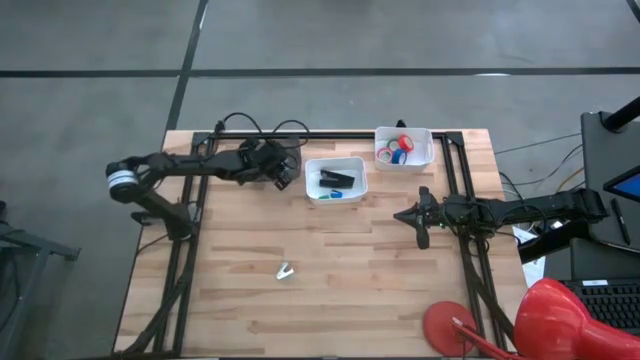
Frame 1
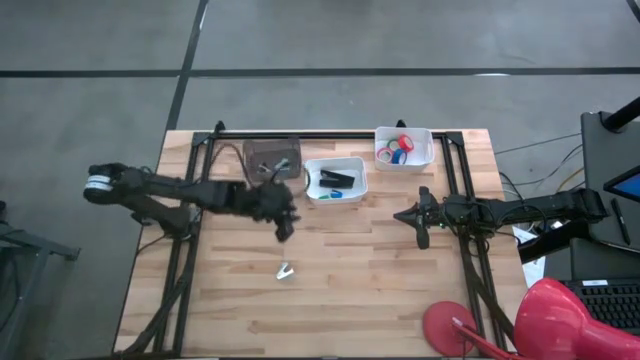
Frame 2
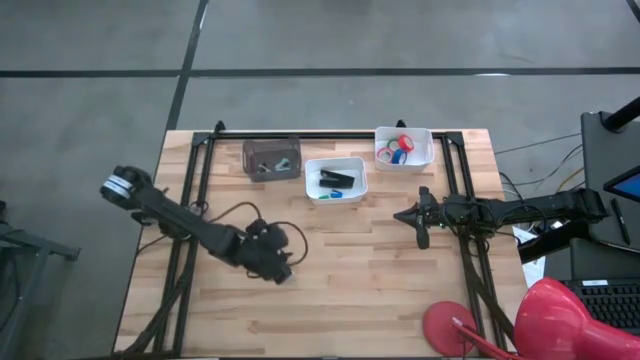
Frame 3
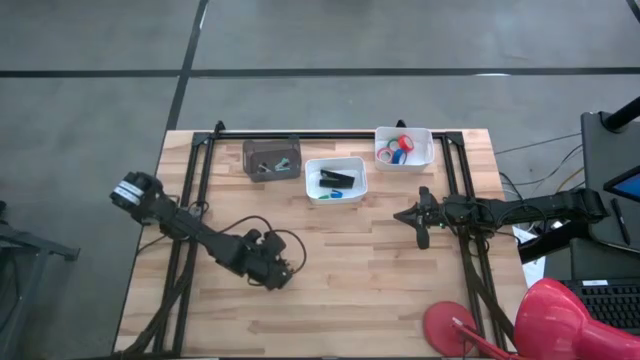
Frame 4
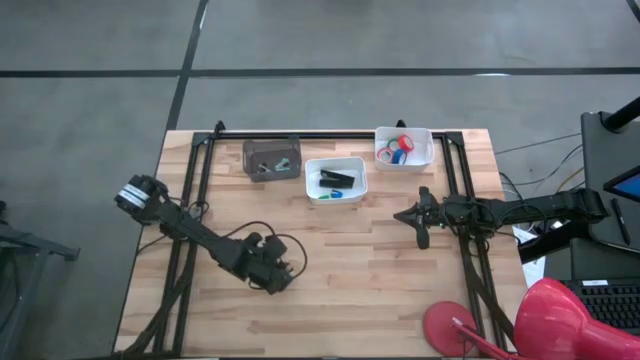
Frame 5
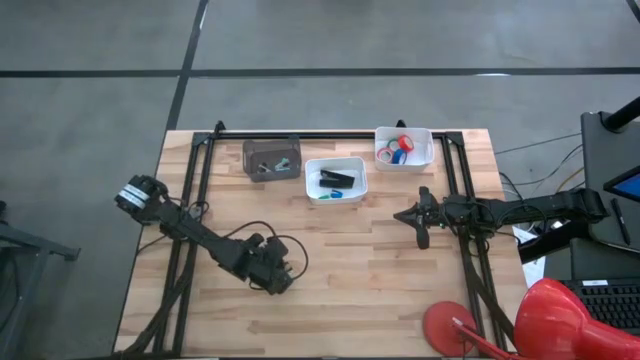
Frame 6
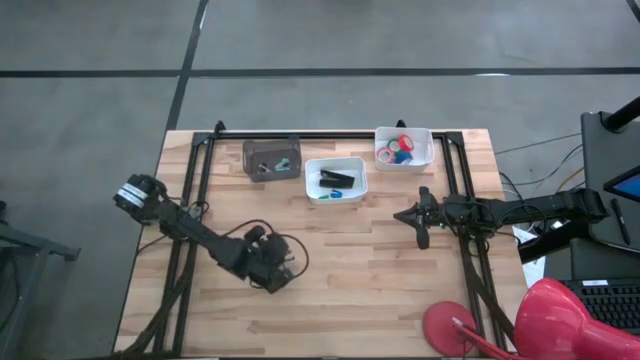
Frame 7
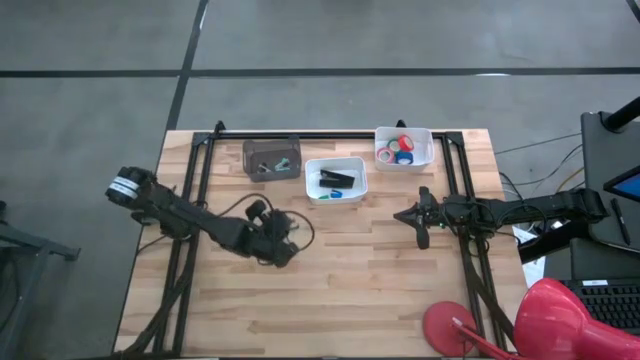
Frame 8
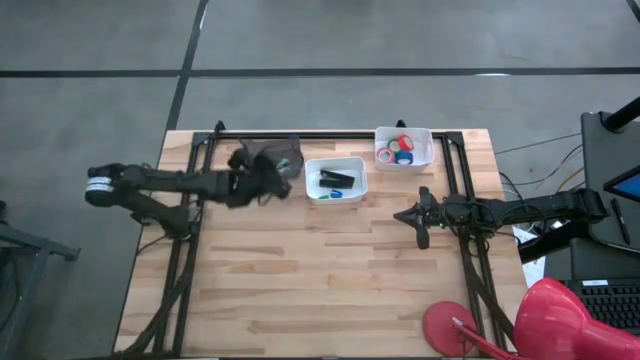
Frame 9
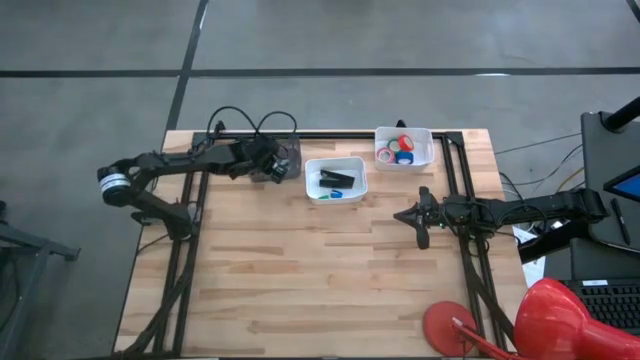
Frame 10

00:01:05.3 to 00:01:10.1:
Task: Pick and place Stapler, Stapler remover, tape
Put the light blue staple remover into the black bin

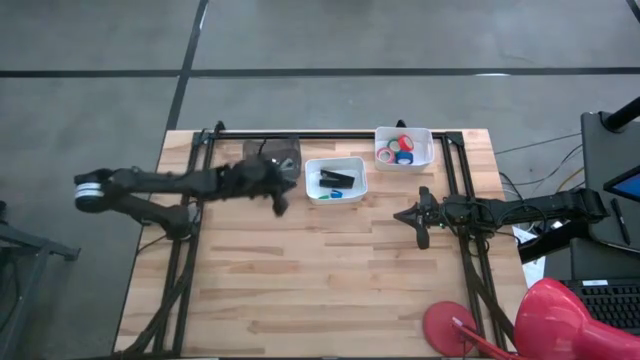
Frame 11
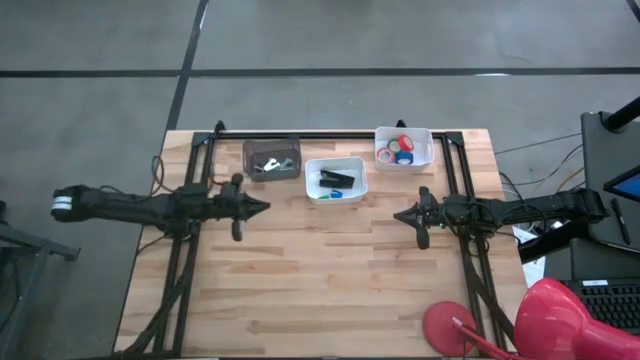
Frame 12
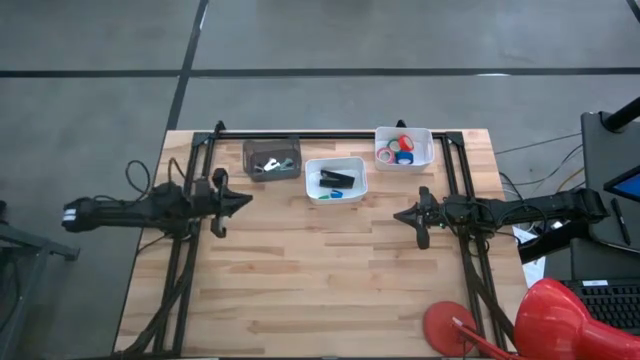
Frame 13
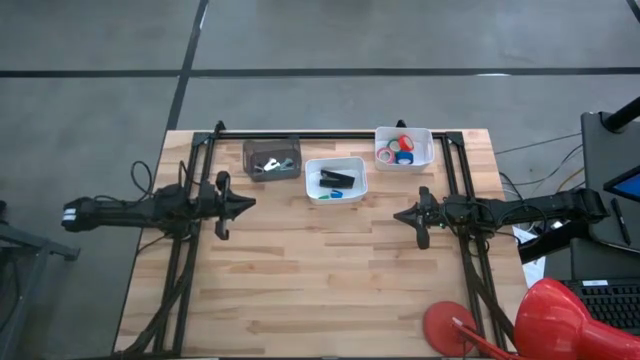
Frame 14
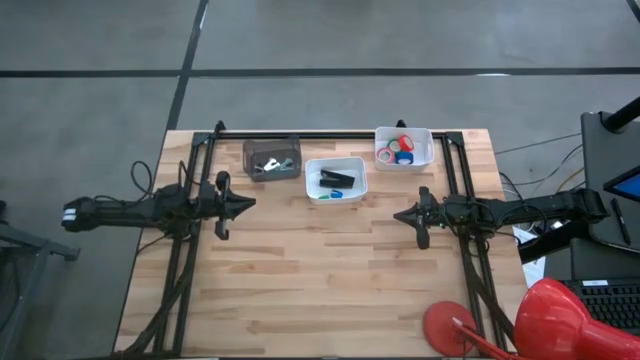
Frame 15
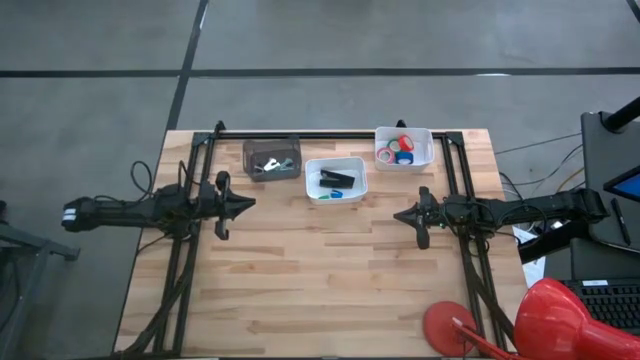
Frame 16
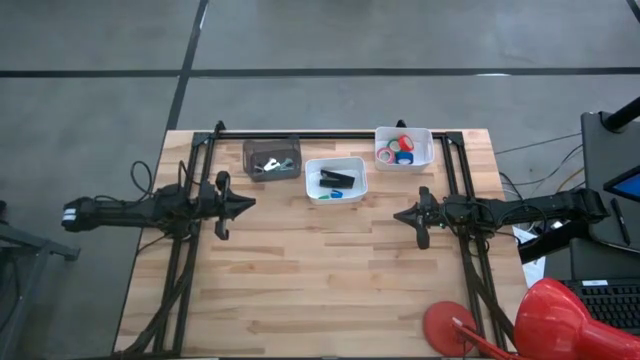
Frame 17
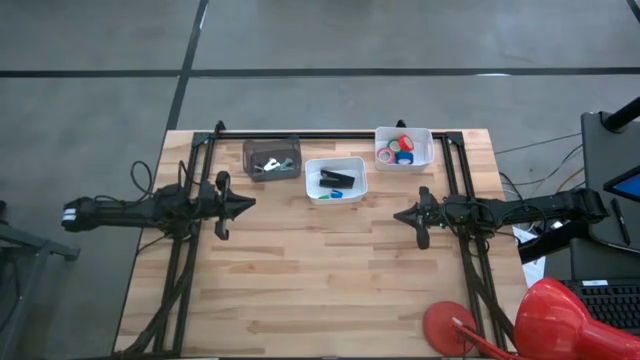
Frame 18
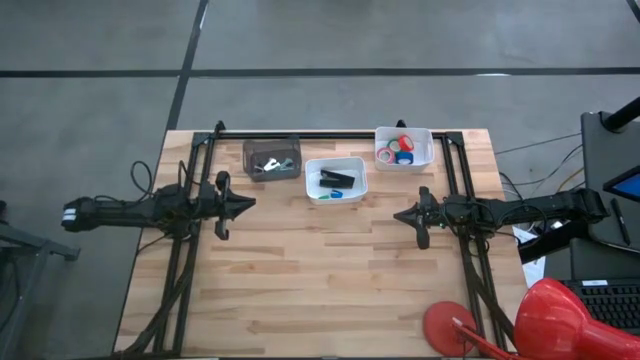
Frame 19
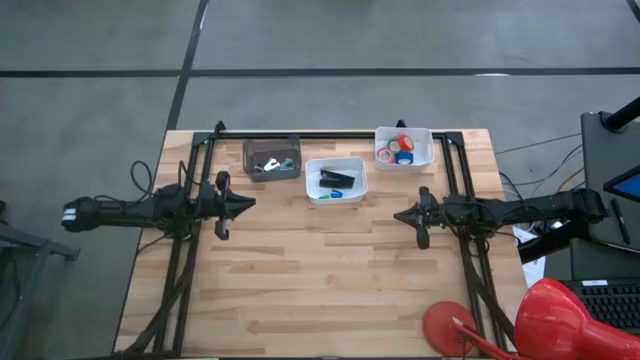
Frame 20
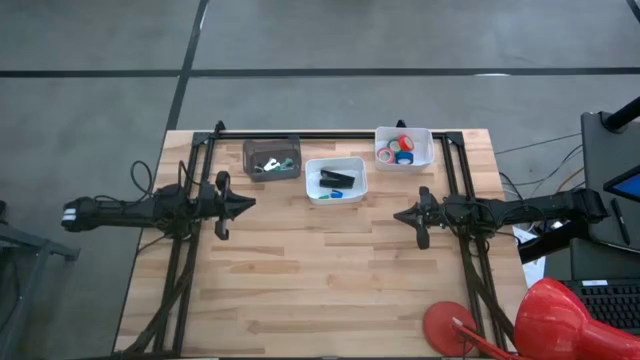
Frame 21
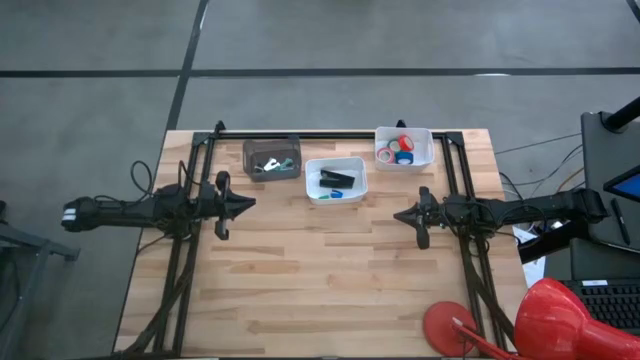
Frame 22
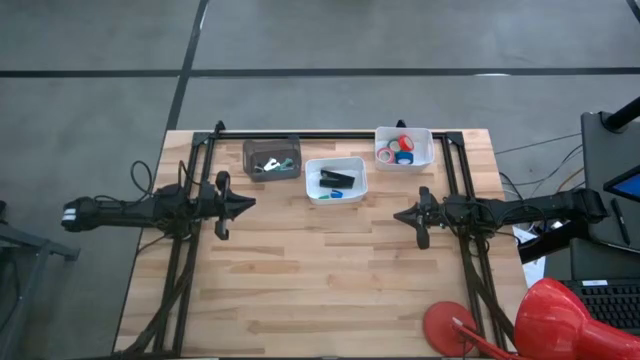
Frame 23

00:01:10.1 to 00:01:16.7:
Return to Home Position

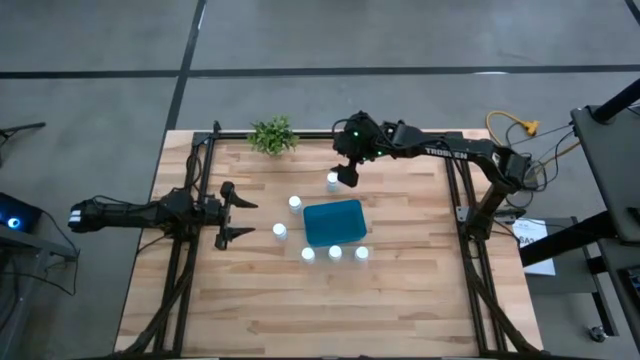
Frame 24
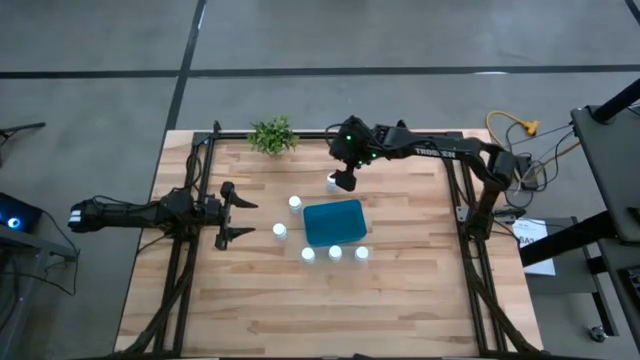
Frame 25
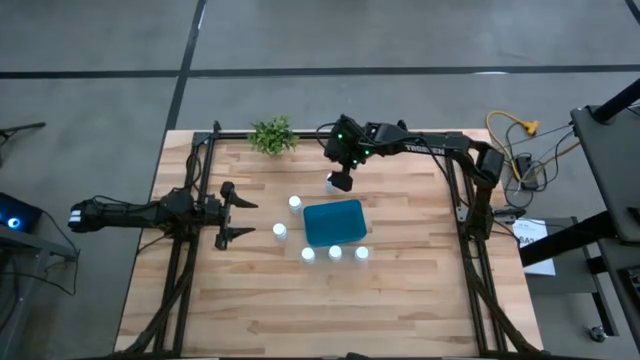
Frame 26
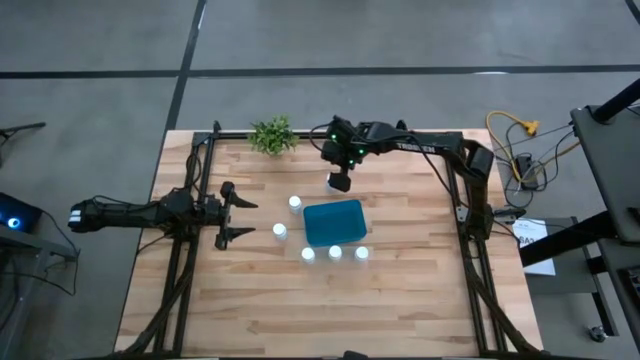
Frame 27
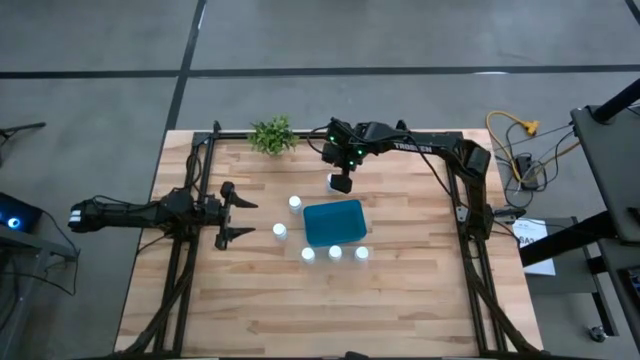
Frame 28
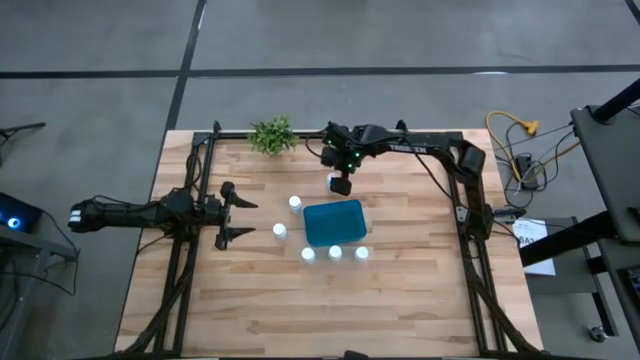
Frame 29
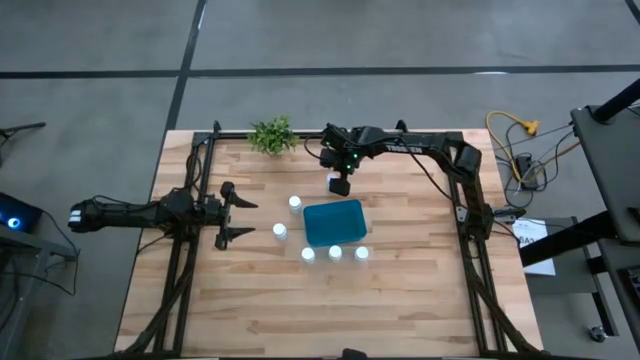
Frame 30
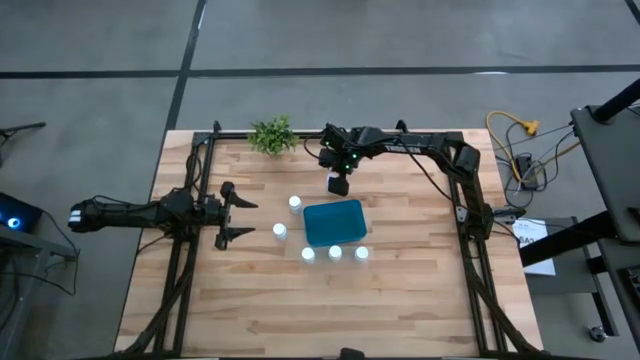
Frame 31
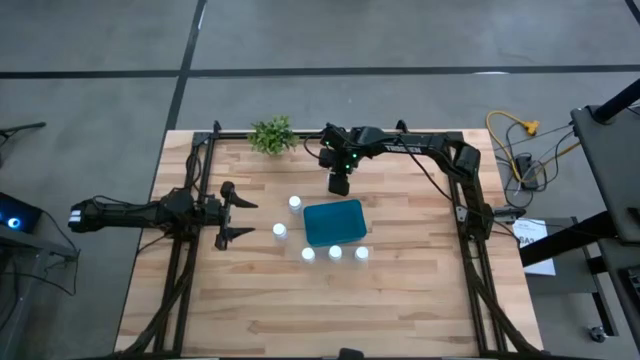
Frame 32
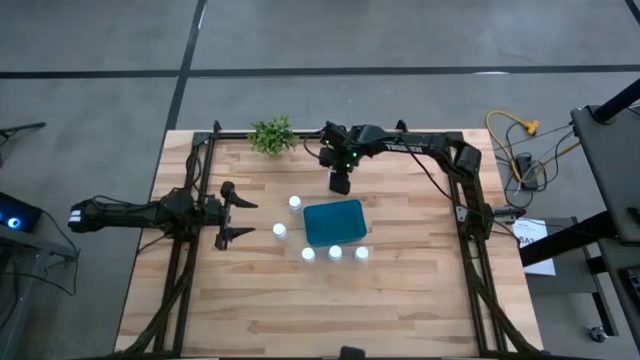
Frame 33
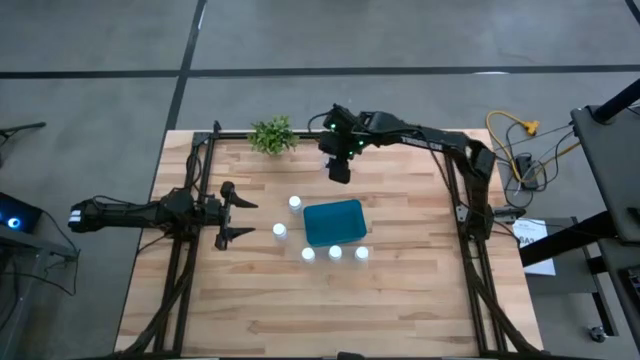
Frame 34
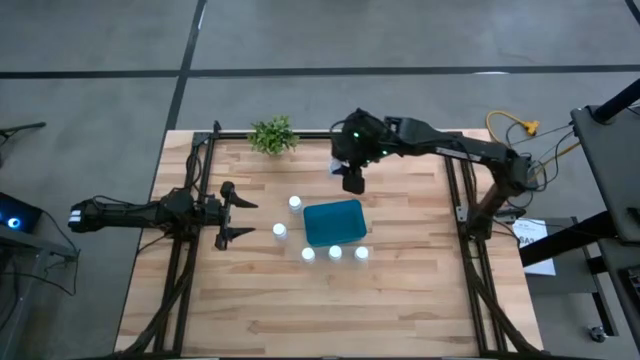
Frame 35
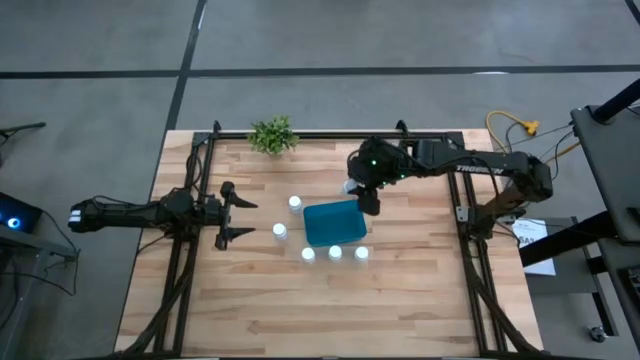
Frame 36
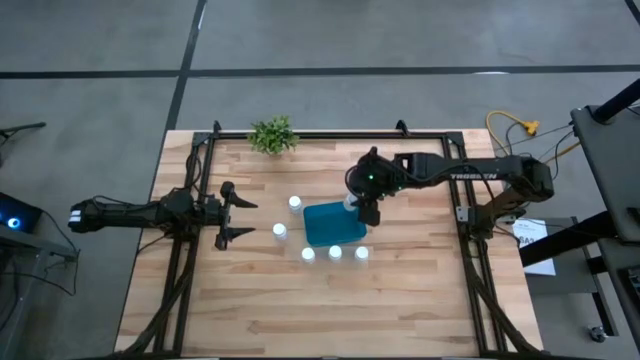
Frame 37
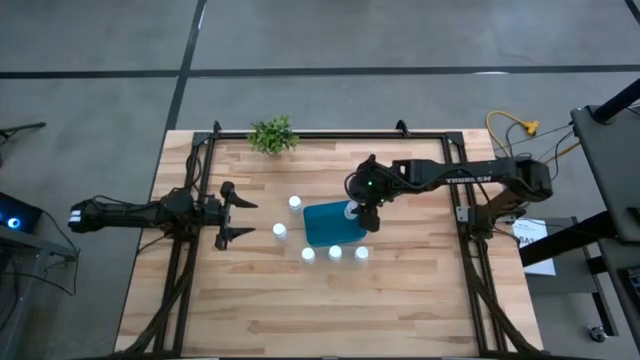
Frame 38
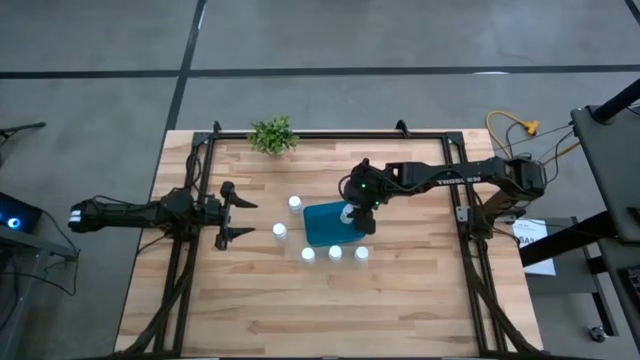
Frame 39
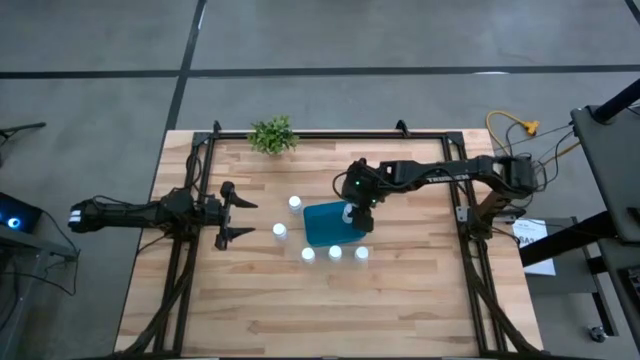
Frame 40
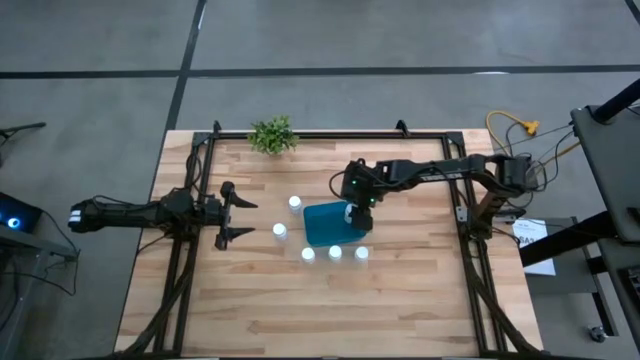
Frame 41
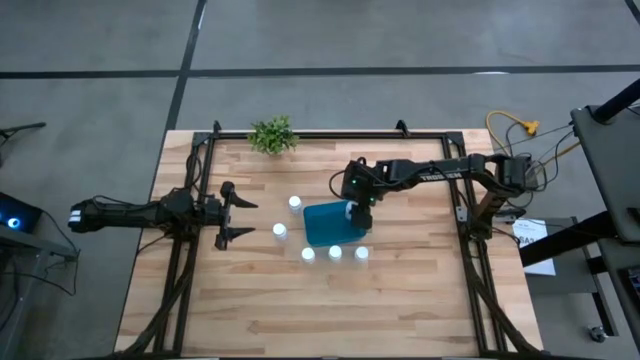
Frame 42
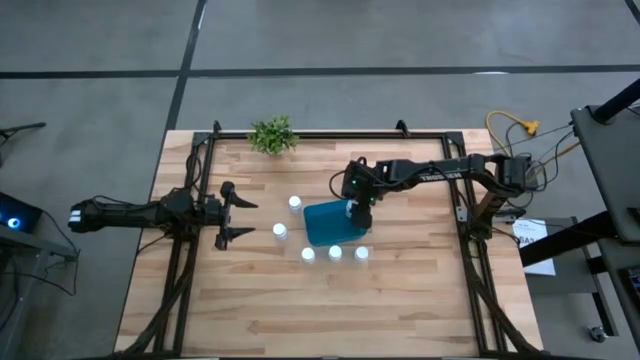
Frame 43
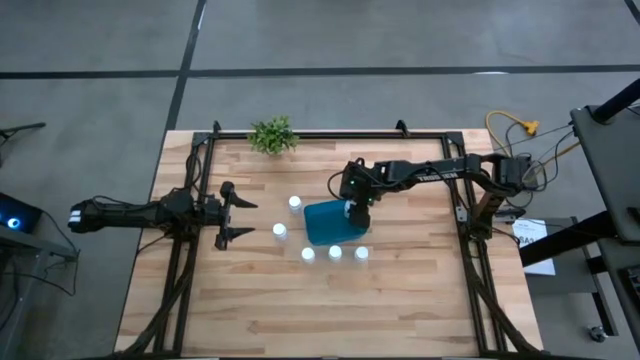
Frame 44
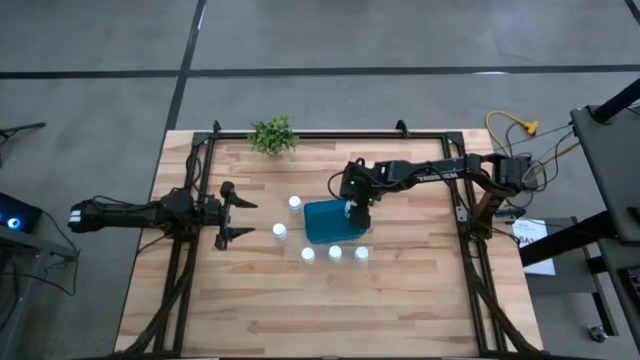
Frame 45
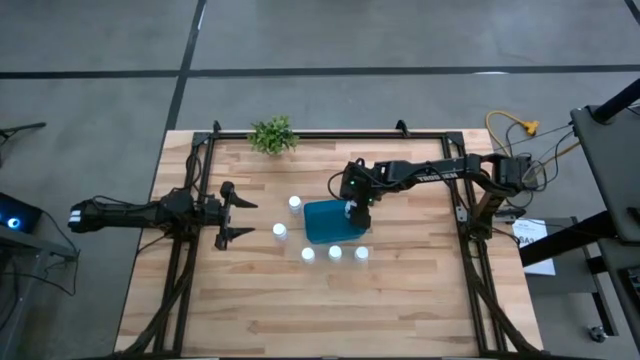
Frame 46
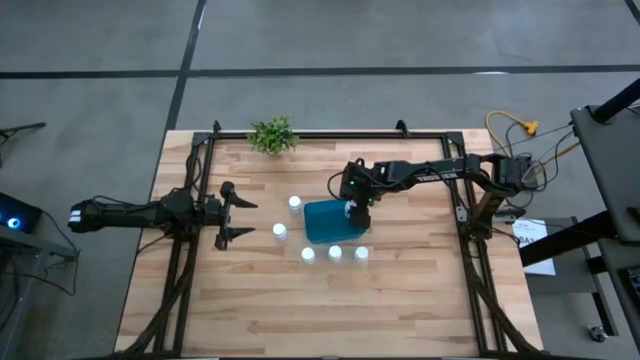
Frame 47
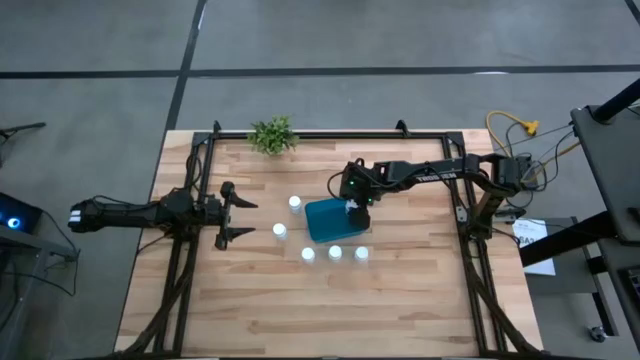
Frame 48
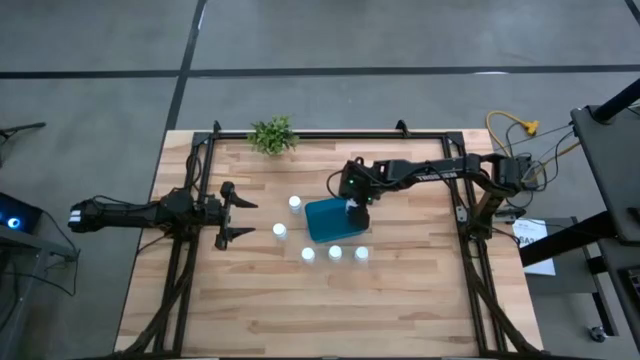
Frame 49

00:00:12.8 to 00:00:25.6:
Task: Pick and place pill bottles into a basket
Put the white medicine bottle into the blue bin
